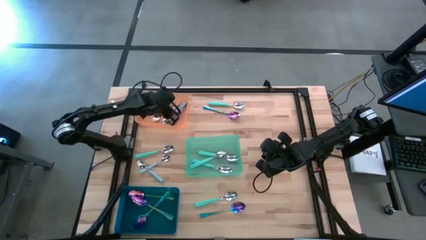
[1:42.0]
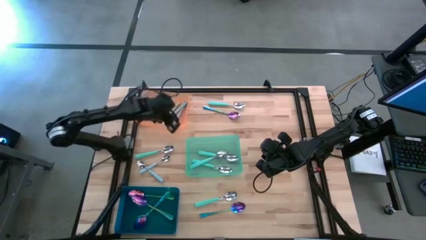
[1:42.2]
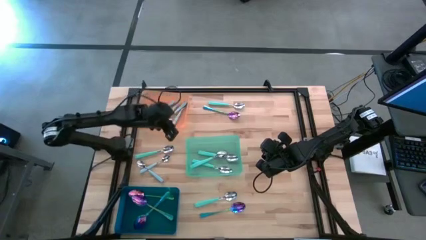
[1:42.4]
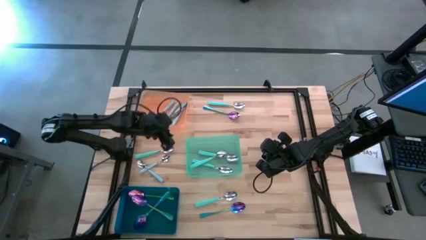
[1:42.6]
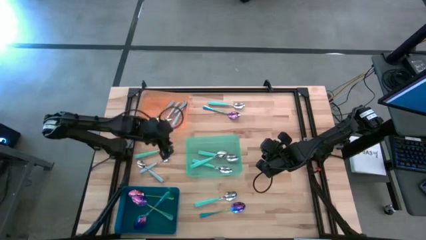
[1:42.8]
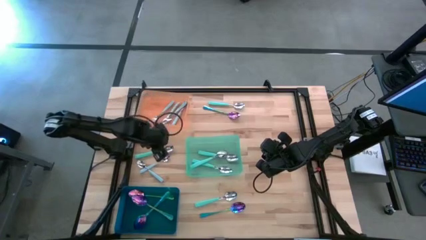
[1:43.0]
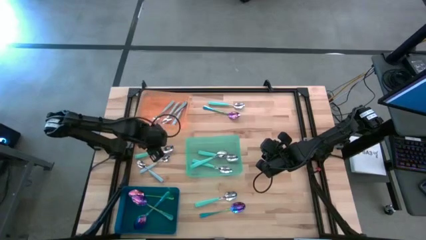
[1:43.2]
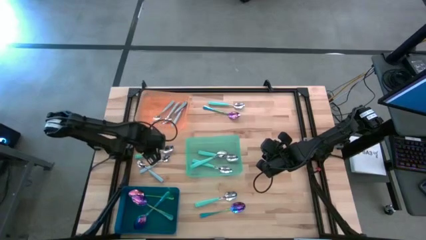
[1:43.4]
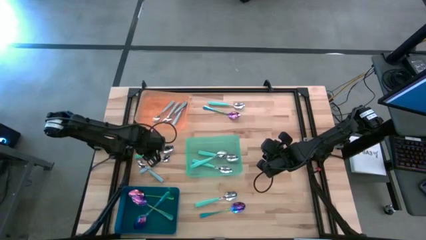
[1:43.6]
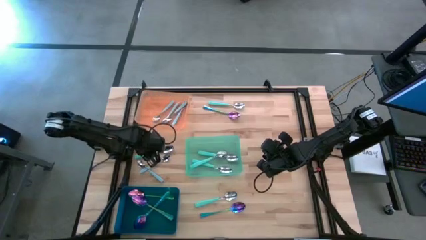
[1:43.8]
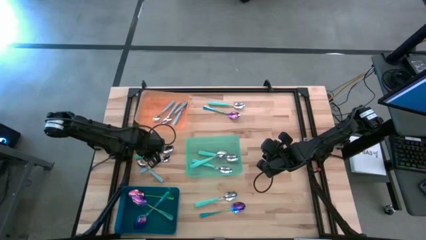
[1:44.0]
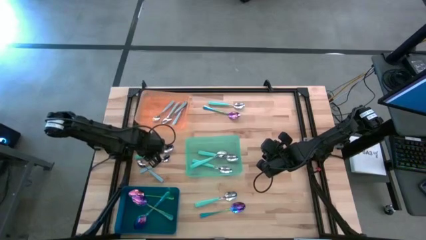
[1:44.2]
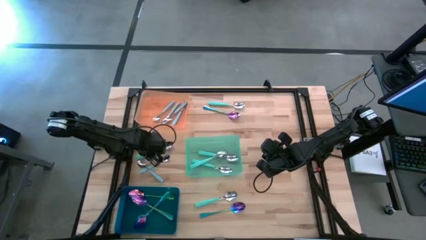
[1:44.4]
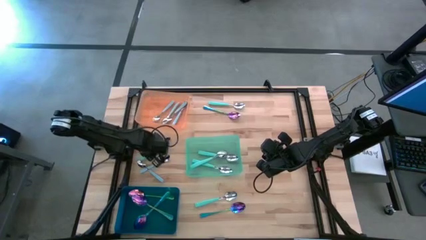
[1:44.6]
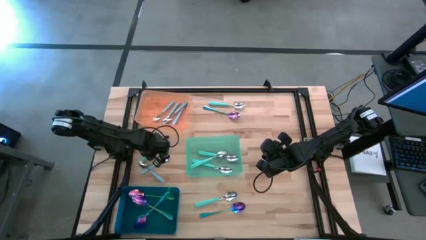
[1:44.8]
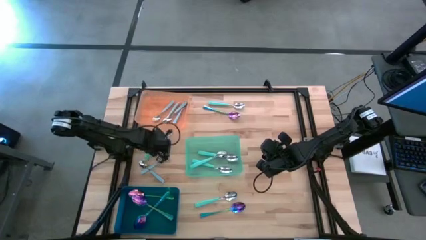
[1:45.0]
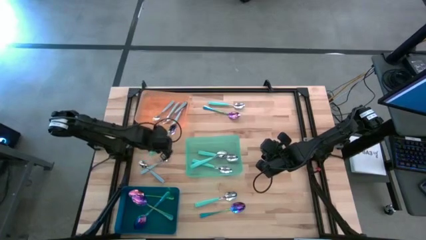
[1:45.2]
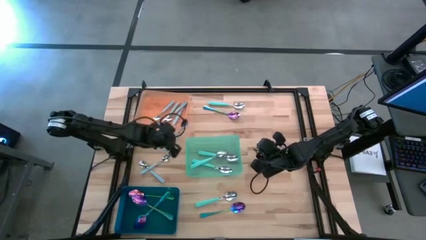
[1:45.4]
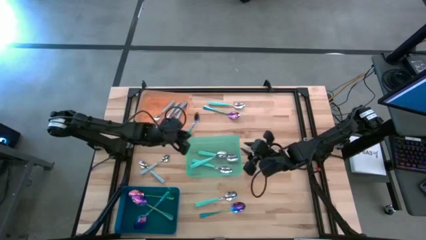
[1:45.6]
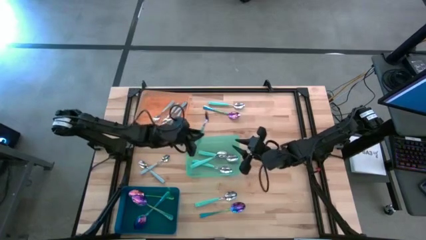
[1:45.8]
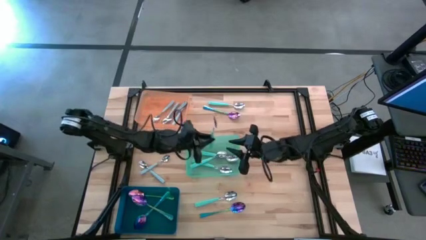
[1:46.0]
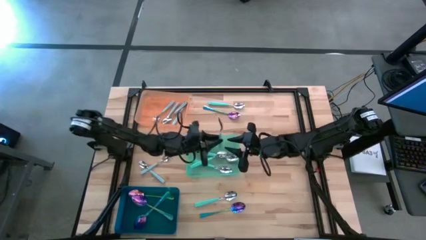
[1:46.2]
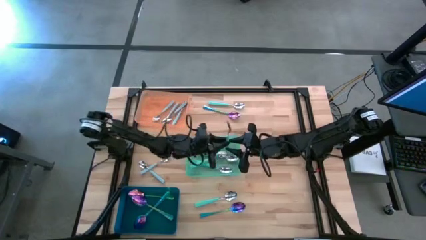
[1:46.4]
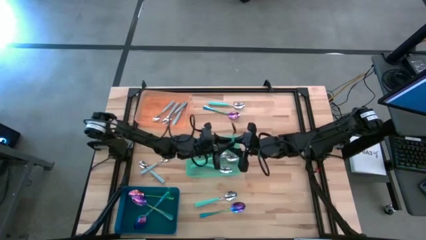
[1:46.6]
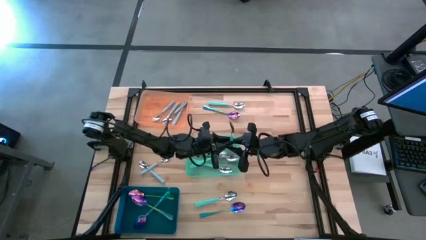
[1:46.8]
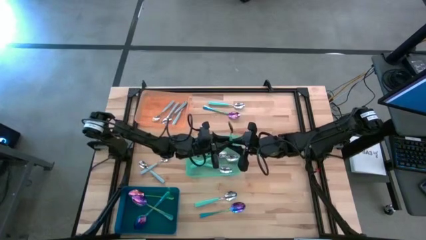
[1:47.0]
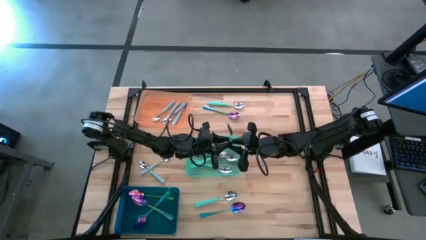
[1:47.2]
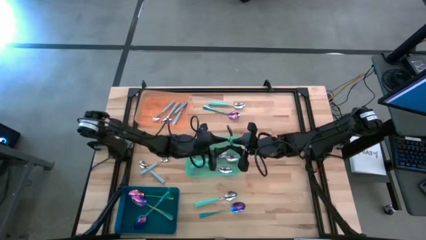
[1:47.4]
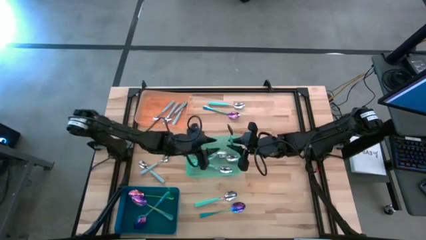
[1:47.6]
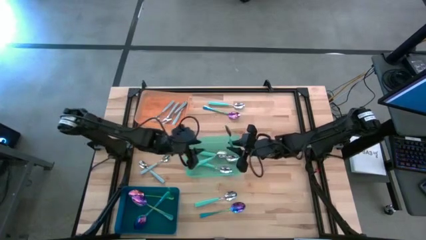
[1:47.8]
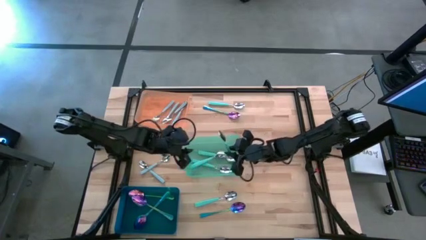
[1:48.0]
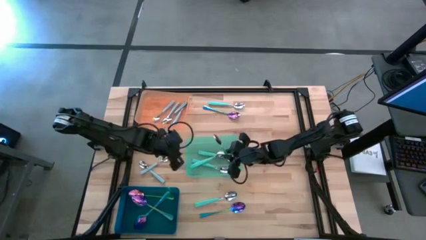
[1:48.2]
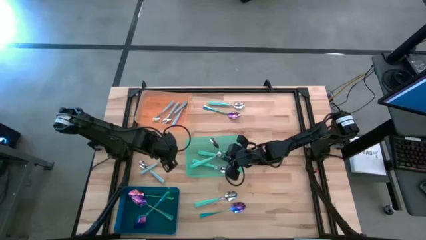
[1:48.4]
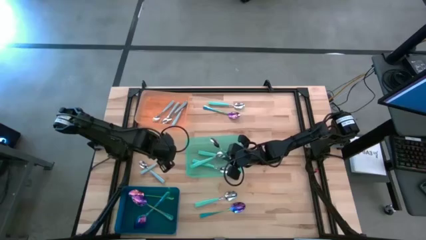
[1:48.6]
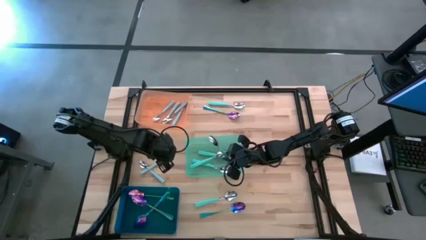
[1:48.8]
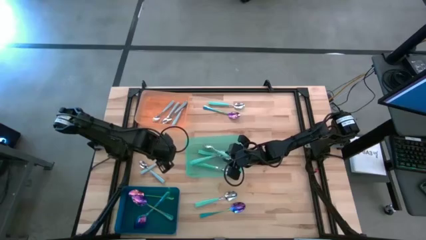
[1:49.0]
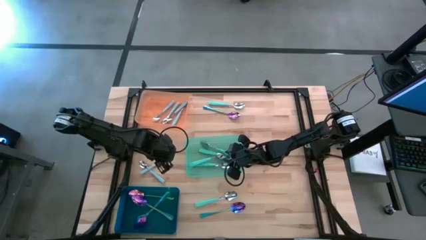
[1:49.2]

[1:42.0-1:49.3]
Task: Sort silverware by color (type)
Put the green spoon into the green bin

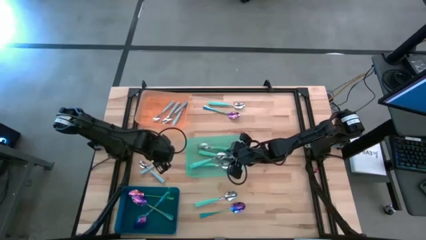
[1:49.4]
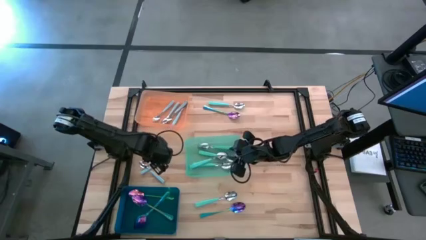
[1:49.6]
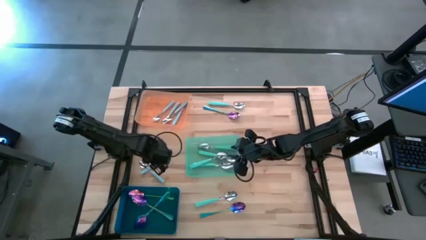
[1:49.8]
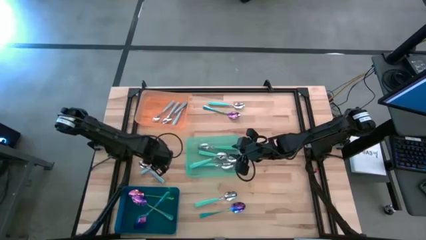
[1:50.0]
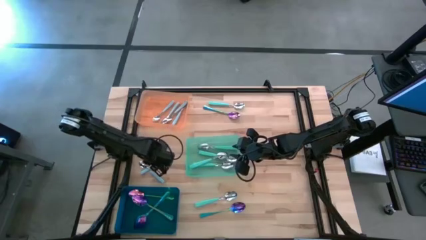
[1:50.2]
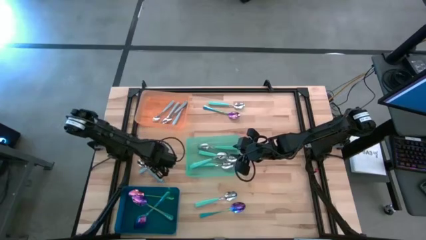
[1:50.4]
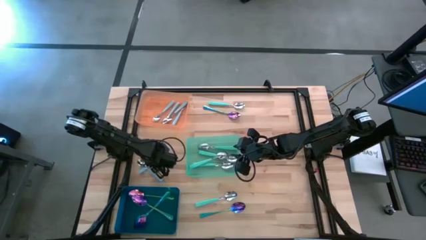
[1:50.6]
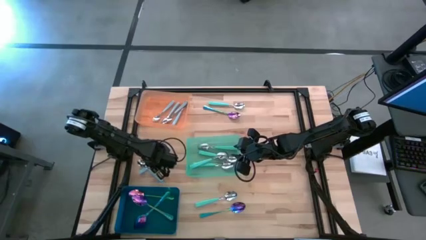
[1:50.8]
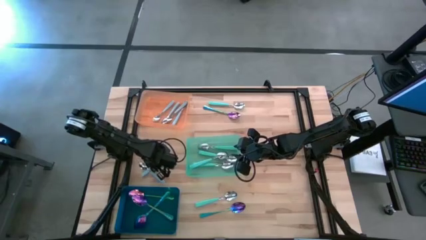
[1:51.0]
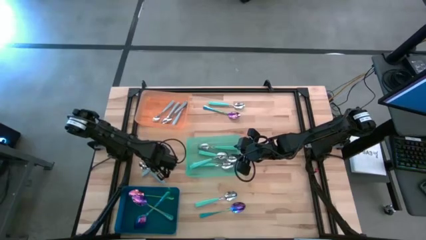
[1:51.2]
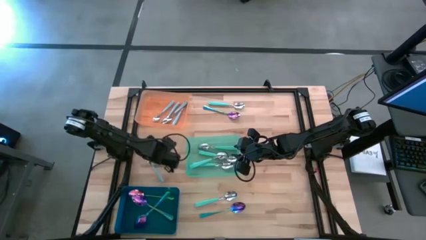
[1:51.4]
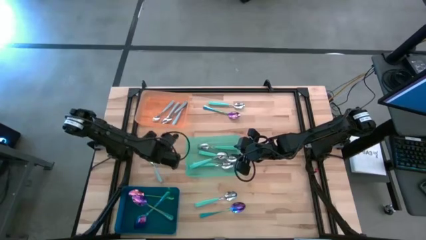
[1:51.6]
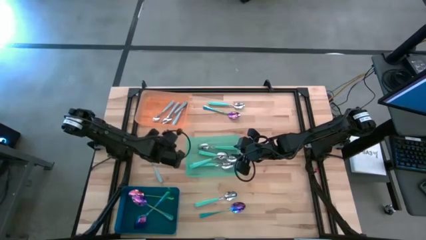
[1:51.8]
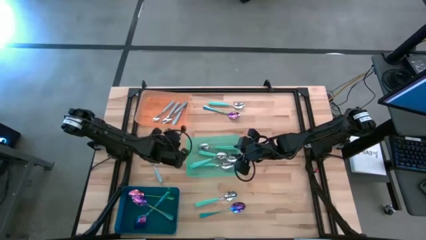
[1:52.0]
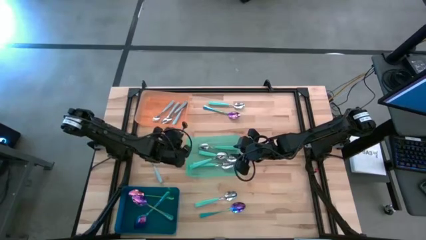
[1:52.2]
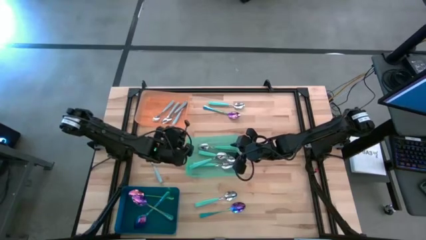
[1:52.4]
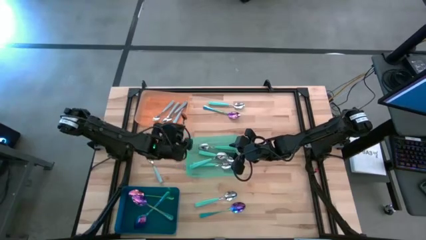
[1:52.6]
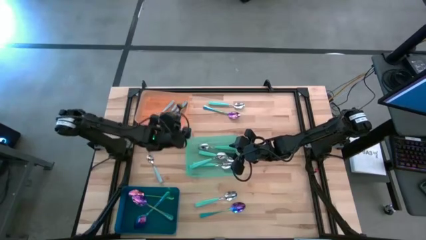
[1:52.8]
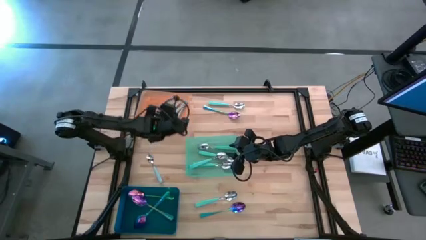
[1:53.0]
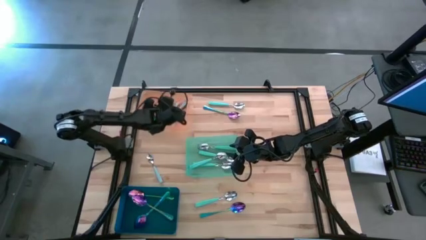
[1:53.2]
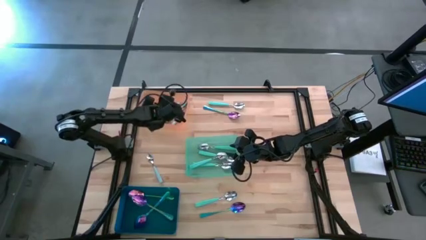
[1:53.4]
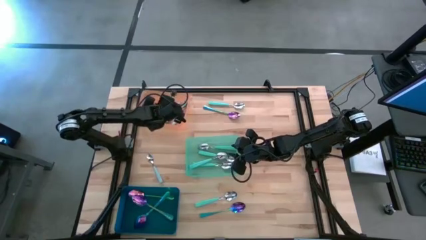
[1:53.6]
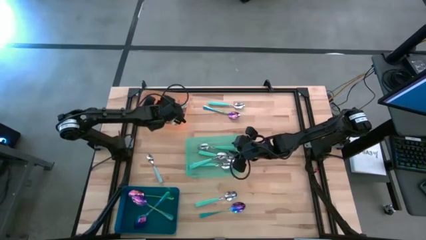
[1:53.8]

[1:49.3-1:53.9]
Put the blue spoon into the orange bin

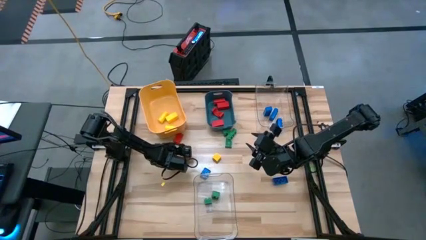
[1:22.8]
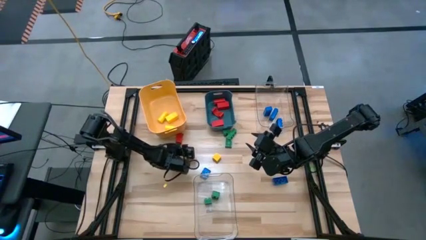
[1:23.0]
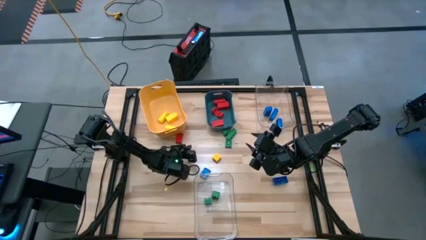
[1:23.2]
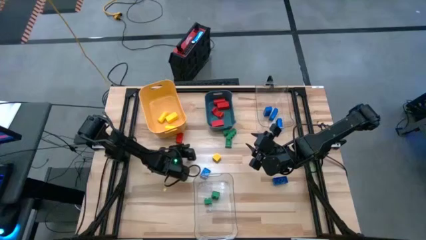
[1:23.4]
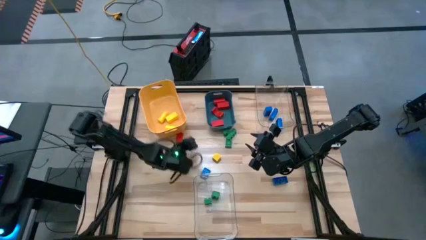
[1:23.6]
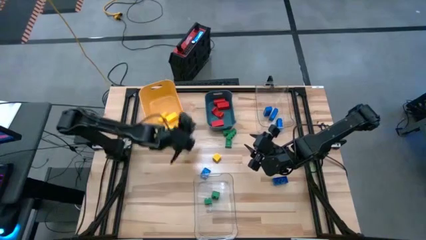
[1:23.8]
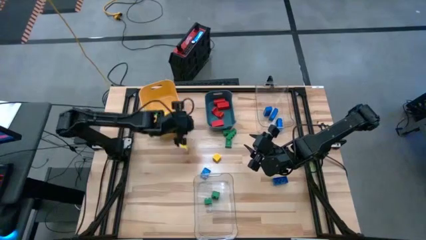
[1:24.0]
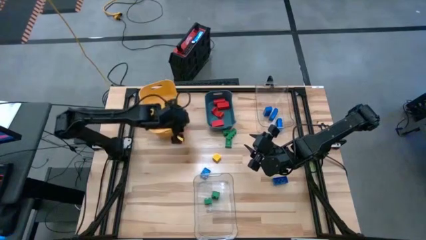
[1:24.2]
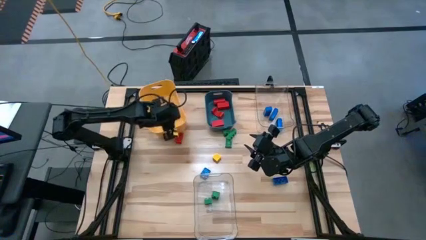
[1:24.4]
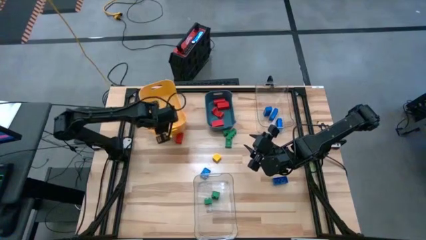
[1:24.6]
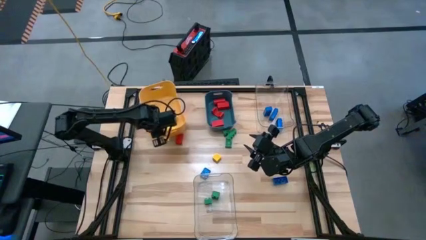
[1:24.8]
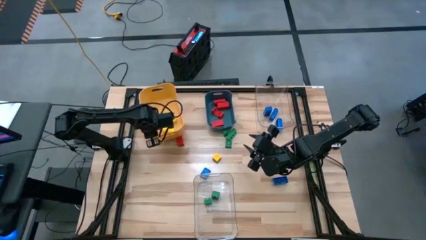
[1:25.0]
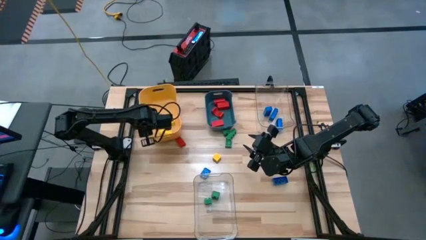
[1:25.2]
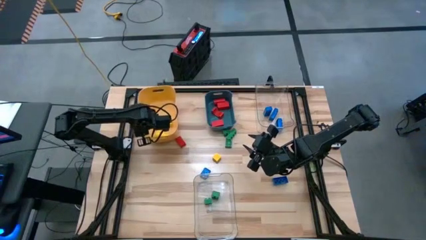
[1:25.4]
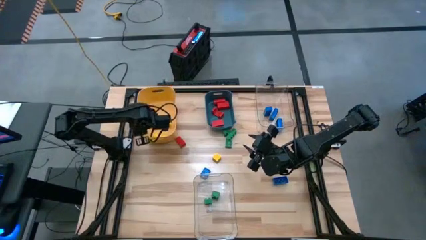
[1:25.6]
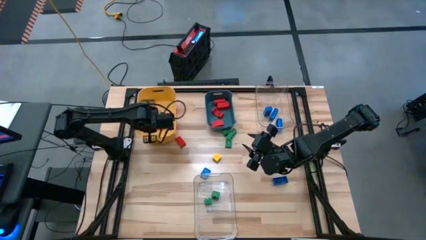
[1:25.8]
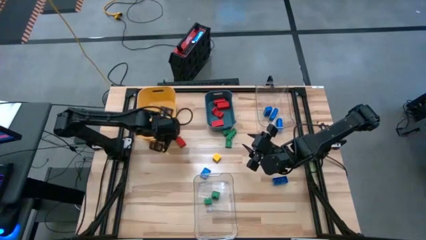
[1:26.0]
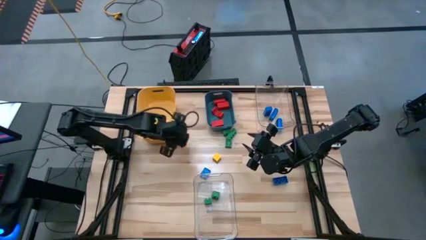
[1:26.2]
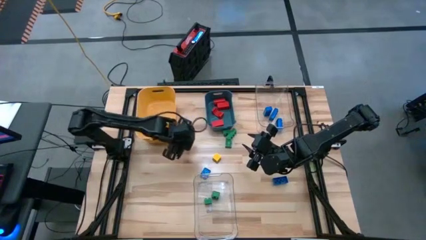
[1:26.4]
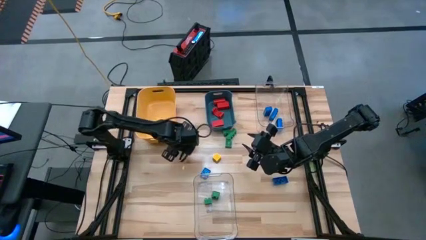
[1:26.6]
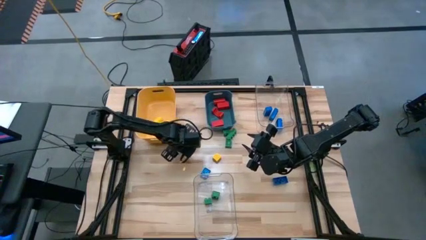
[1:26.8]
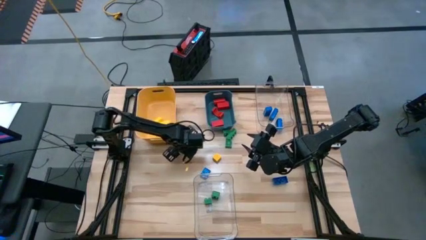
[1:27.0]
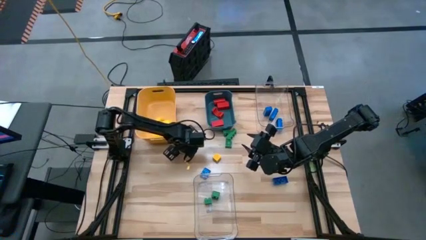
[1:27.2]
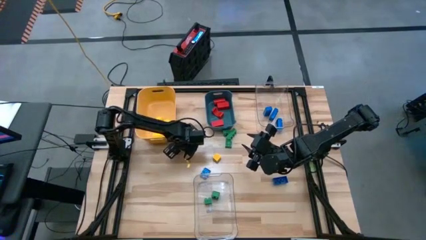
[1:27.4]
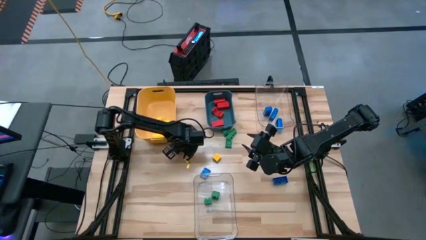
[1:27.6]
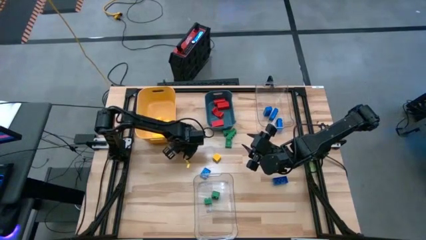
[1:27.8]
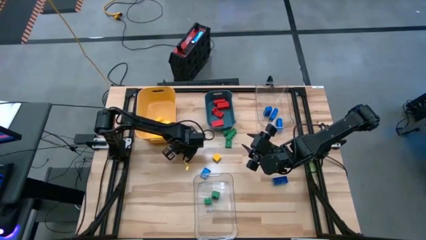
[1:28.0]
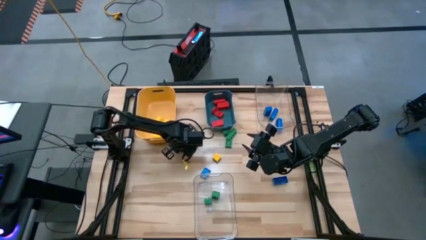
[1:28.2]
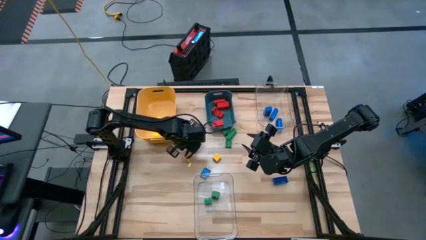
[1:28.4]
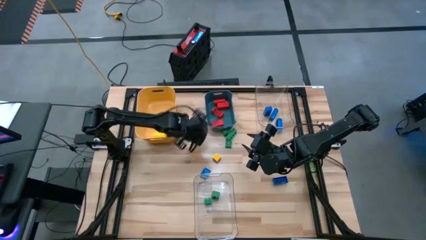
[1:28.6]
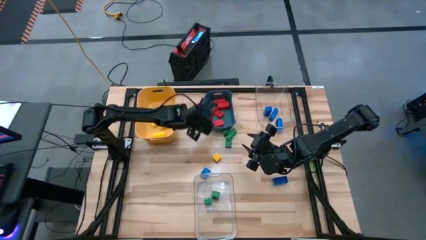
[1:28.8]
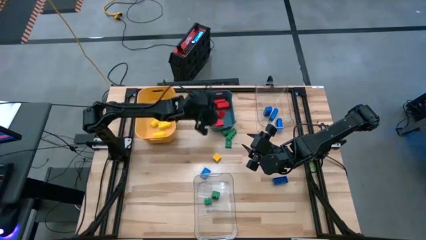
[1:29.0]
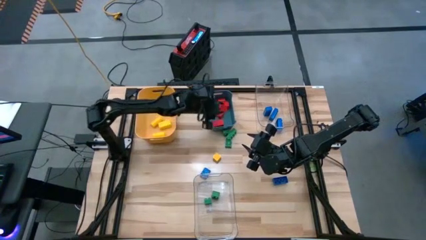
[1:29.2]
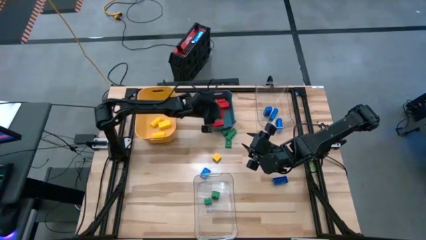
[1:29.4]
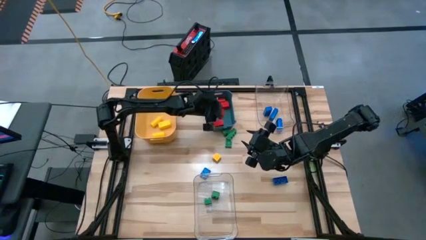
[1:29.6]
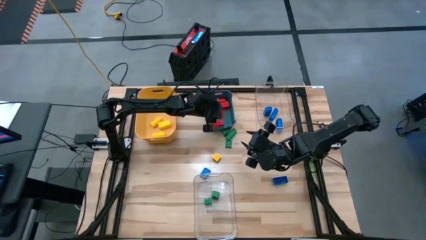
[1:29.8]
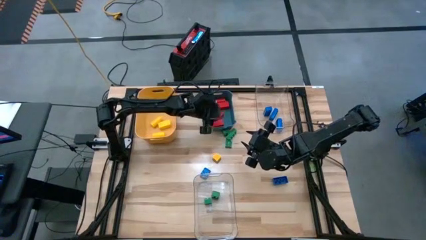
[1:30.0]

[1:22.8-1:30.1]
Task: Sort blocks
Put the red wooden block into the blue bin
